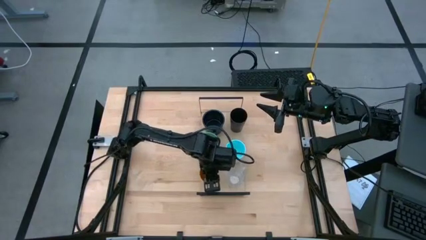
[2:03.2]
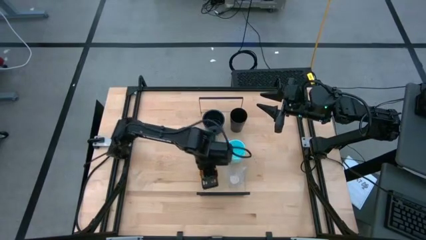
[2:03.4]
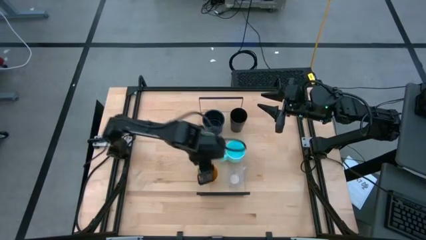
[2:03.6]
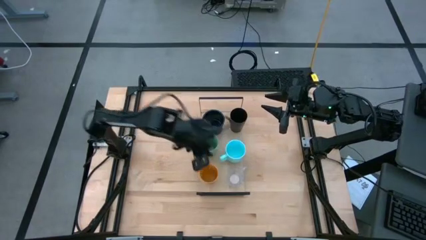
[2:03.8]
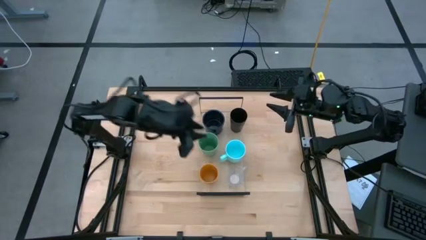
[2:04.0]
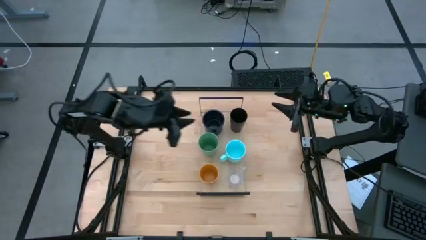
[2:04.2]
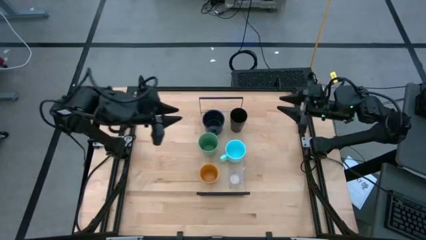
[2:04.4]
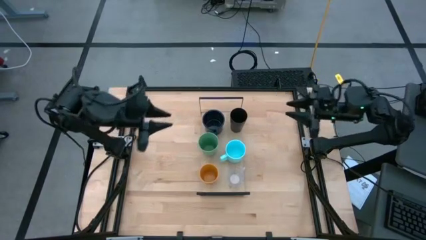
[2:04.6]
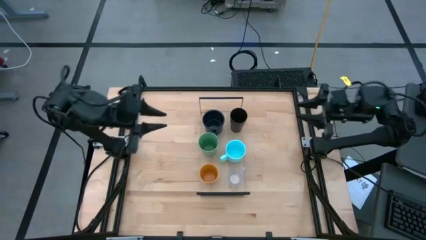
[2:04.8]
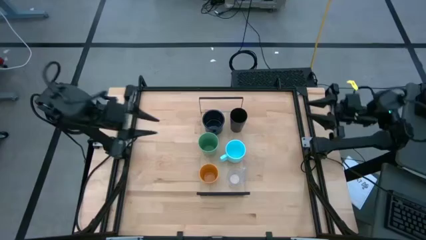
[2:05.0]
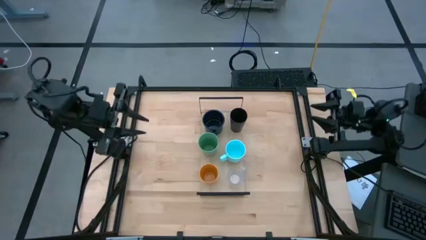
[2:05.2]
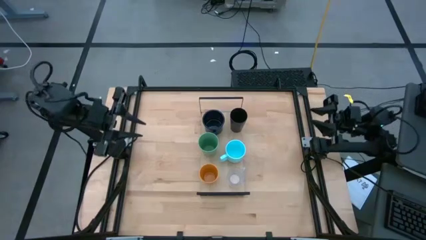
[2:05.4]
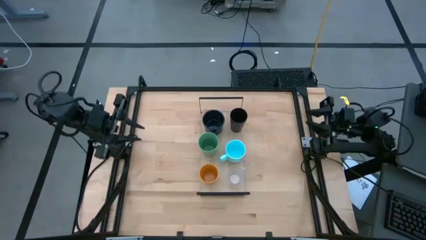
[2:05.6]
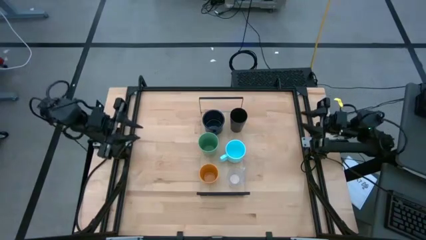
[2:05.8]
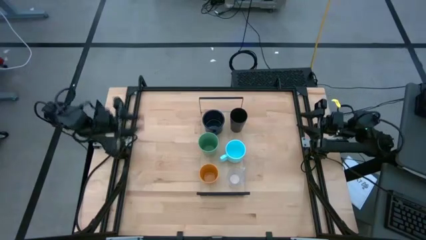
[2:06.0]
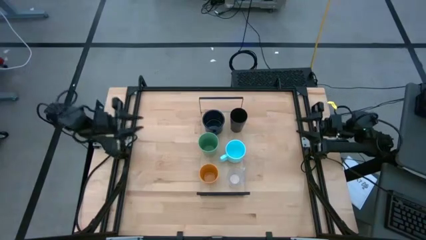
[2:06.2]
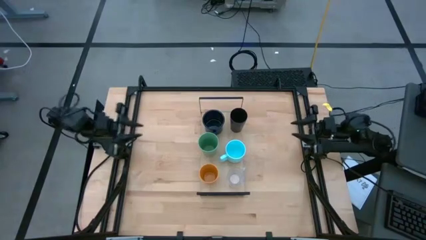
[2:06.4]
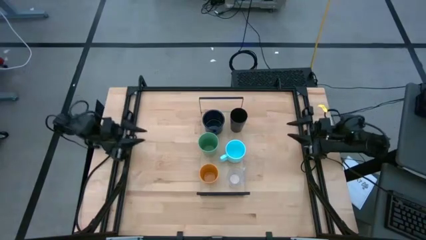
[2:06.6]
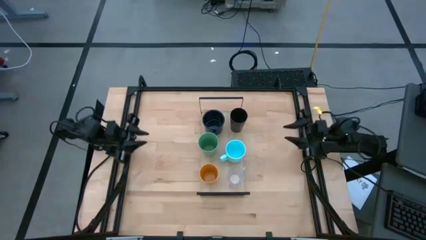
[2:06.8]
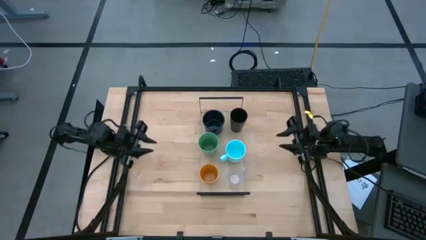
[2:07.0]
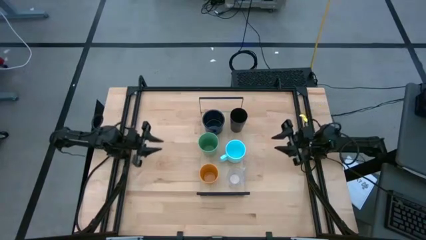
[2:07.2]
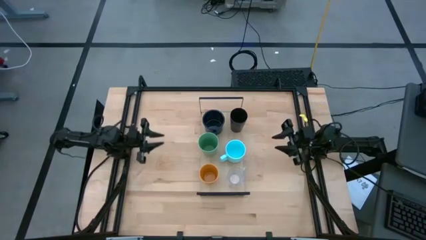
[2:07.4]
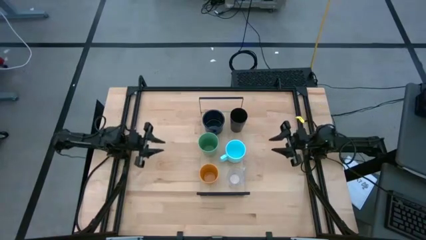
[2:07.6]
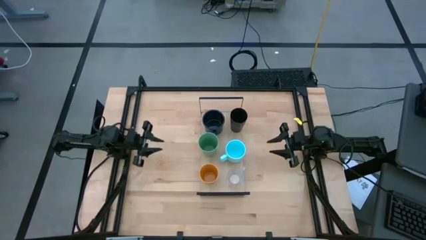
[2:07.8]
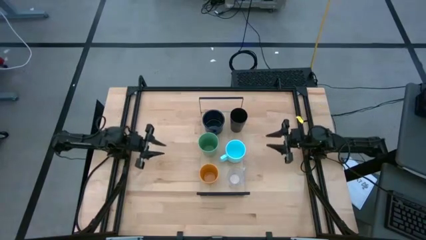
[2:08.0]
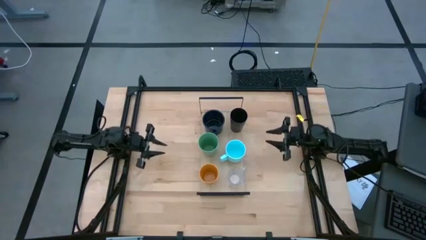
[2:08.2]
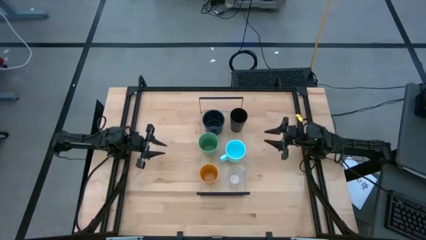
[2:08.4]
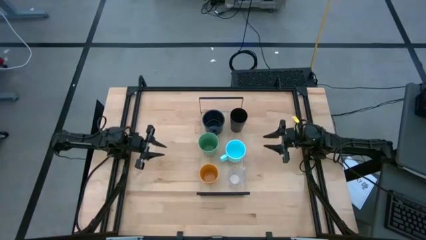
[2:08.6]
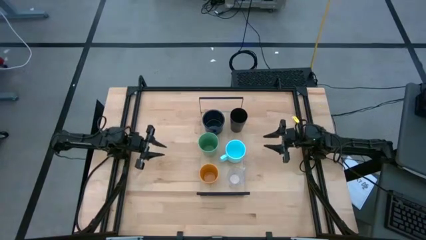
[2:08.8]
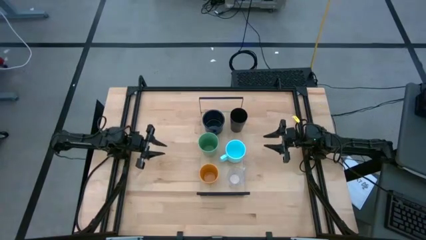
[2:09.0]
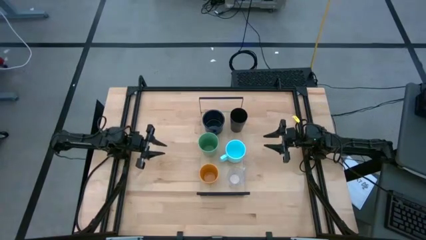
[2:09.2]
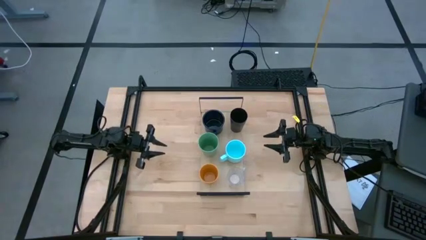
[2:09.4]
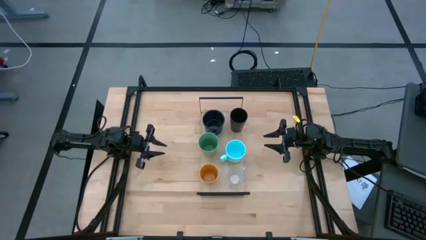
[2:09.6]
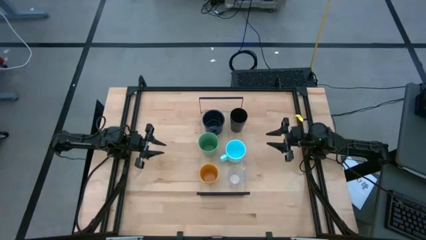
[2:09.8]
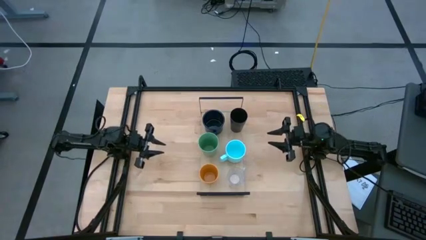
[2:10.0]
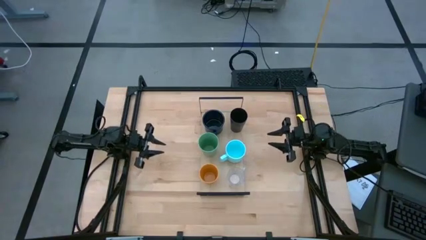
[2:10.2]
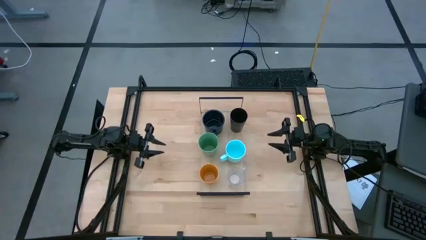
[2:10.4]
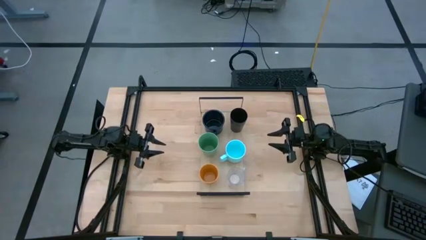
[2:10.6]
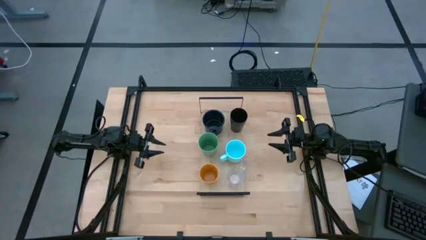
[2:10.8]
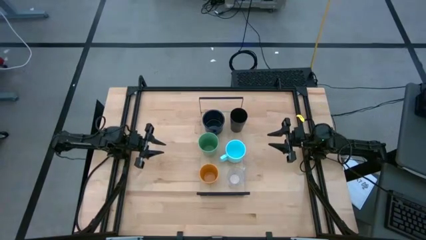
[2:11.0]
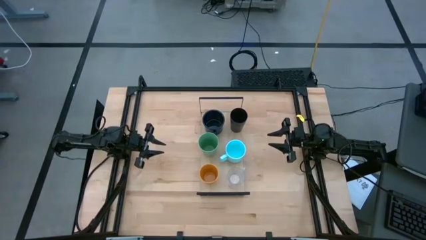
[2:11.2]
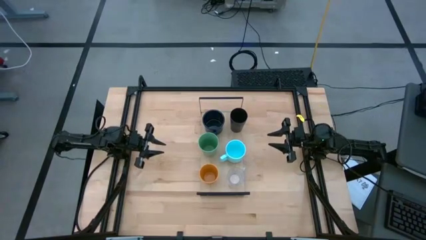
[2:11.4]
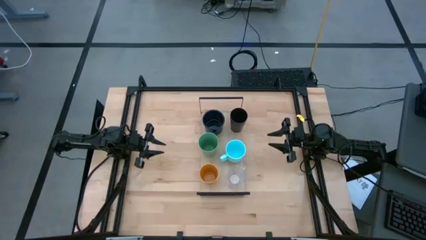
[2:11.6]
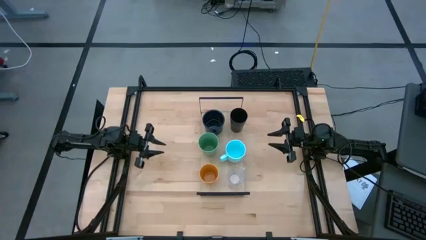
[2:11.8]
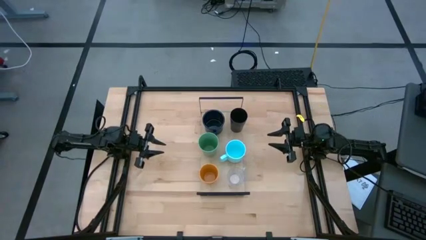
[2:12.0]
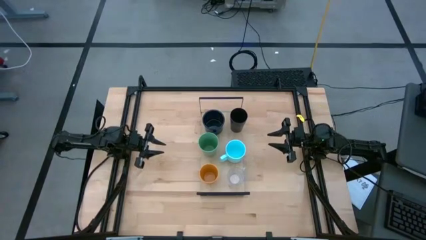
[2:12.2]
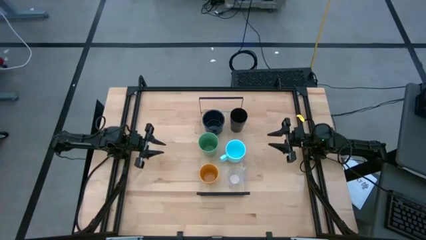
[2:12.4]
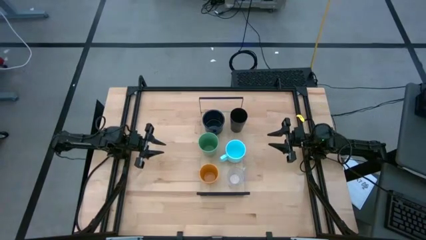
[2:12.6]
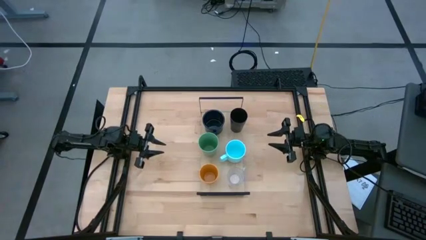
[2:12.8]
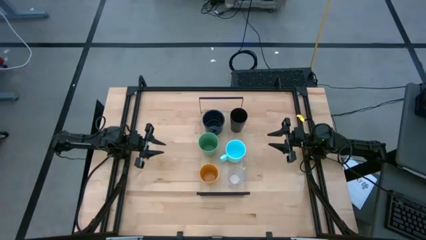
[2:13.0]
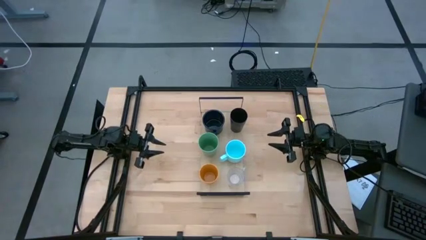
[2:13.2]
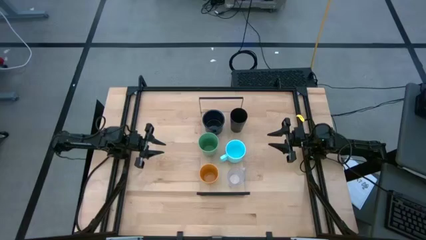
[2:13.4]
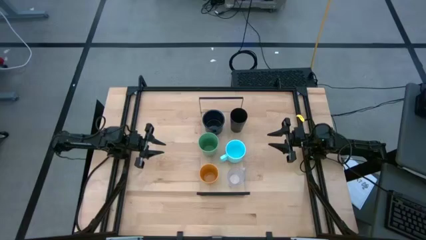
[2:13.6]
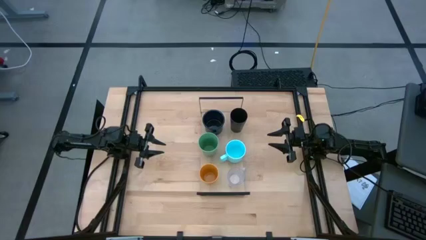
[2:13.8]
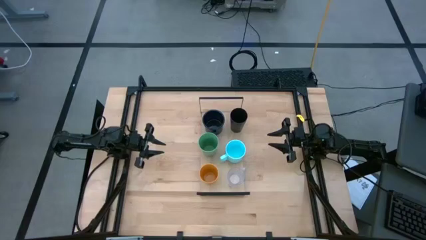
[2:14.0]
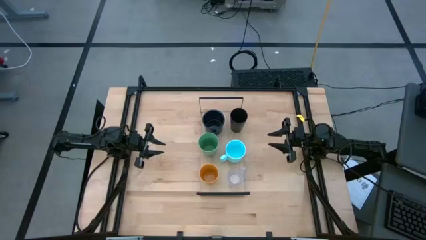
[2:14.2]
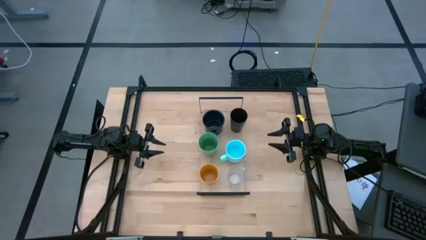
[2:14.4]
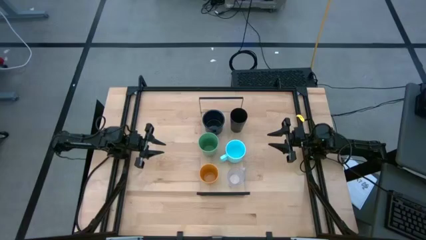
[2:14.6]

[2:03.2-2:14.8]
Task: Stack small to large cups/mugs on shelf
Return to Home Position

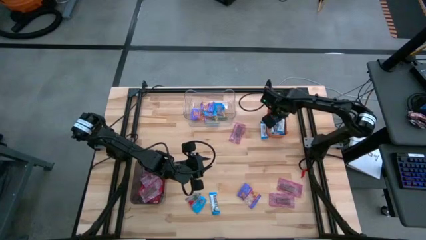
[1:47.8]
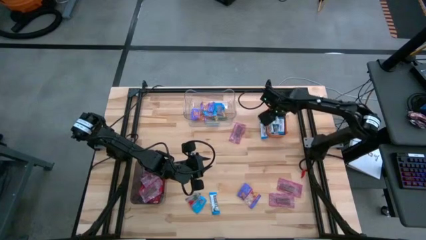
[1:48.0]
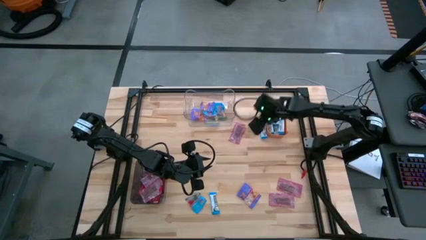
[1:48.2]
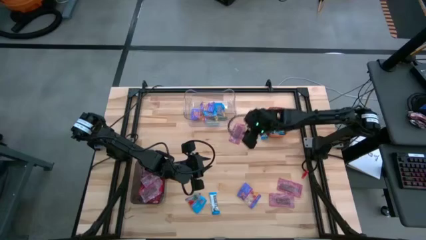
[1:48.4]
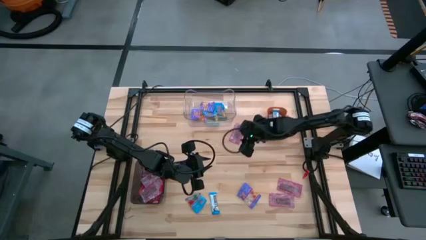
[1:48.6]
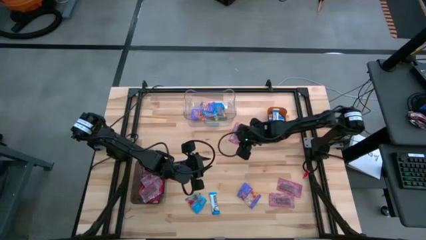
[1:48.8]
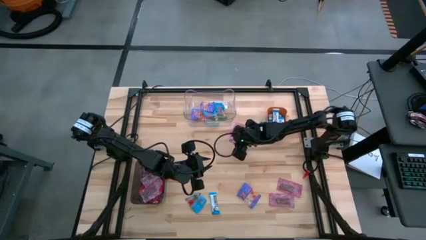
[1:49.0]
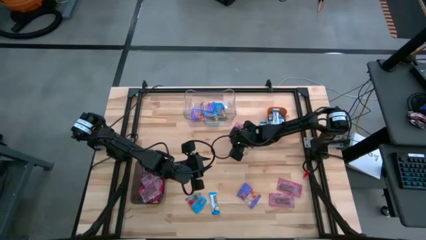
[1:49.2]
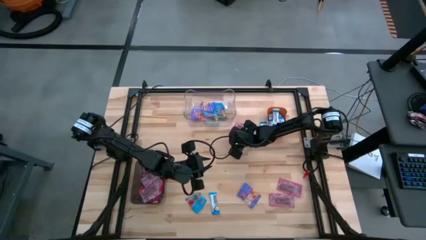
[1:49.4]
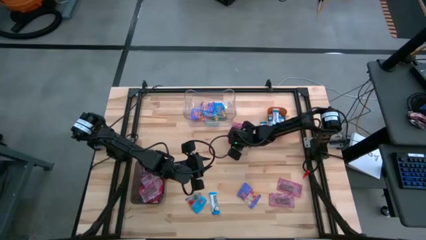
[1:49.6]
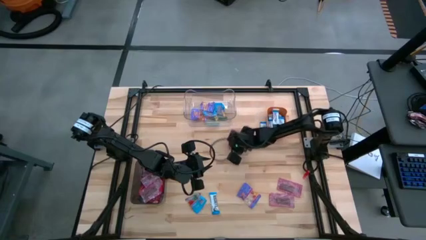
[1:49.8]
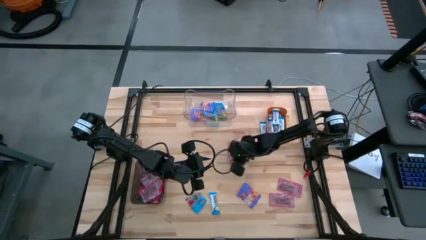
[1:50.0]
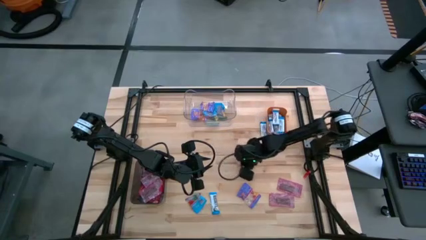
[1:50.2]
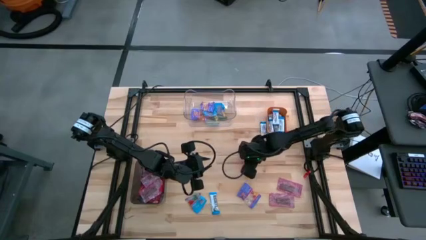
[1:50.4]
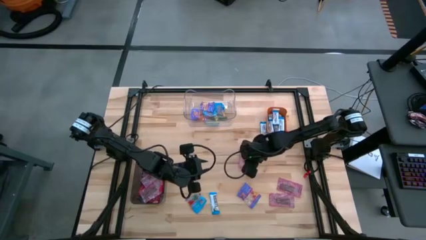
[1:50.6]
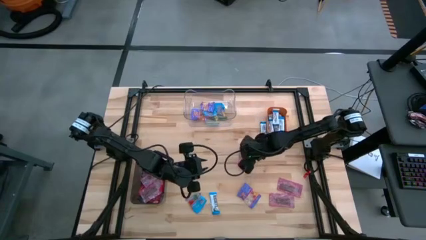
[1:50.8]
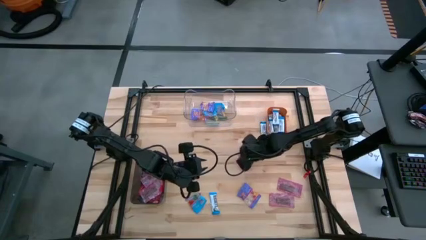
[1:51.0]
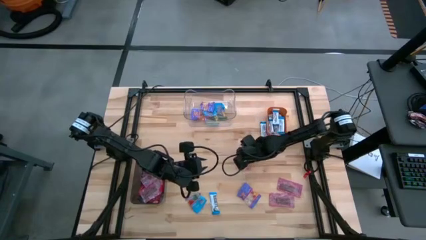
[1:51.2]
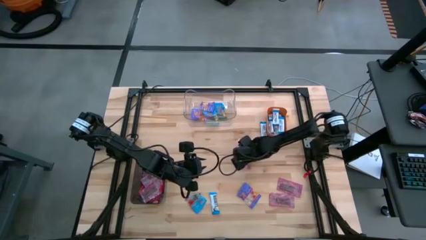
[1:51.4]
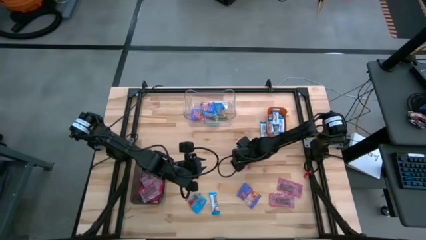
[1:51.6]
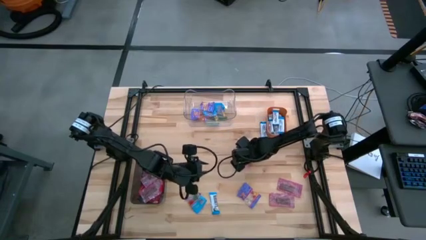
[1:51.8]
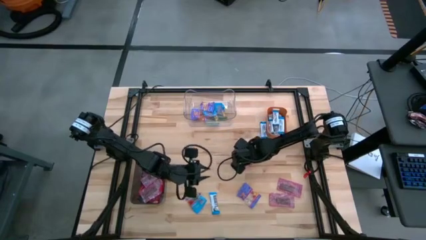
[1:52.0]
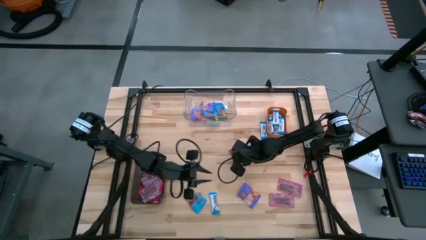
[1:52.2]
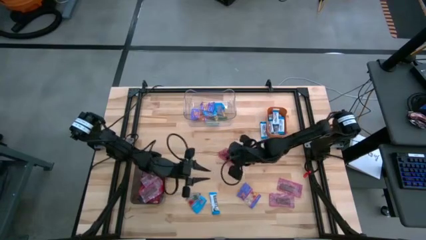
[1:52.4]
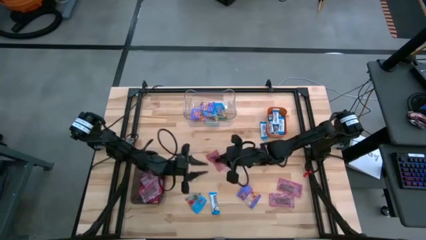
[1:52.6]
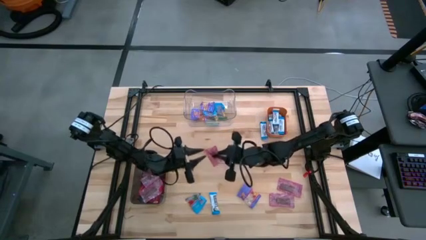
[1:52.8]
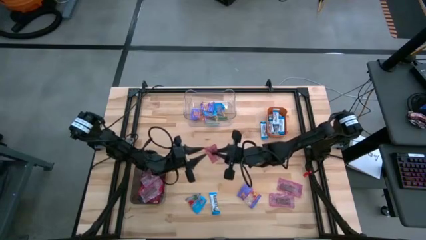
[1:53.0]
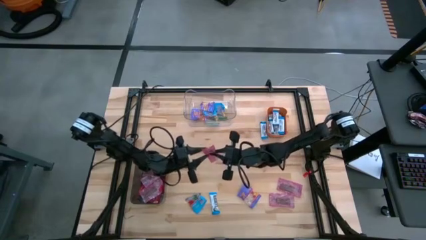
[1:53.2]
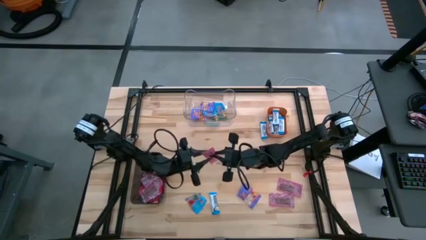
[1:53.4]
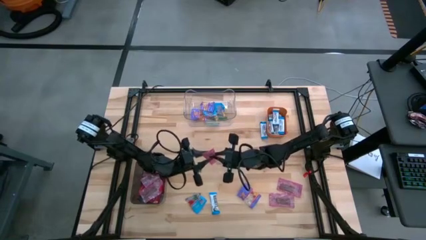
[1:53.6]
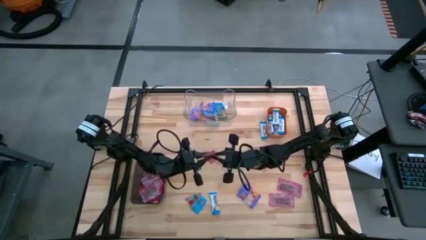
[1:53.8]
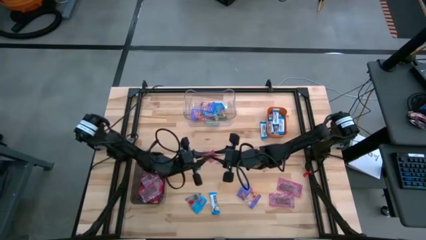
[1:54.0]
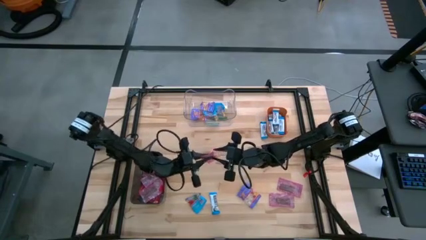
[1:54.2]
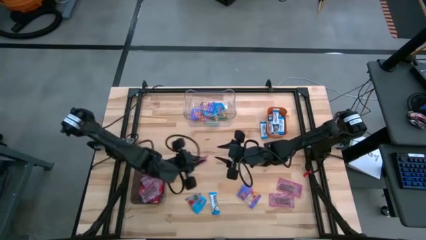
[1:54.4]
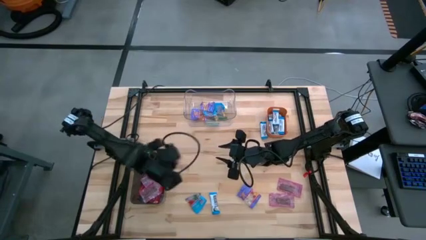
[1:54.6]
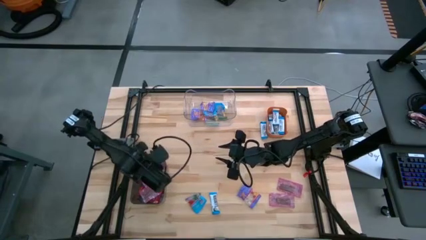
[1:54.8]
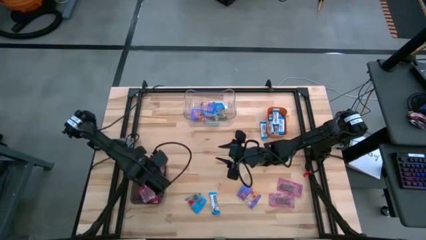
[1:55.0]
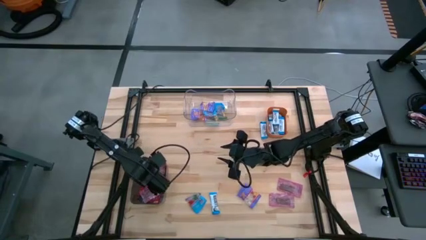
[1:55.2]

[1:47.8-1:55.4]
Task: Sort candy
Put the red candy into the black bin
